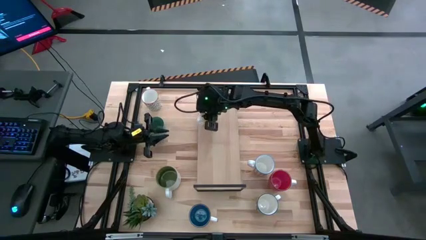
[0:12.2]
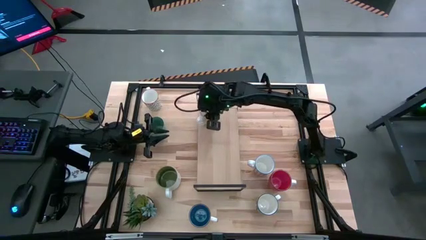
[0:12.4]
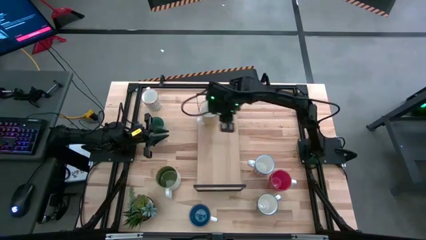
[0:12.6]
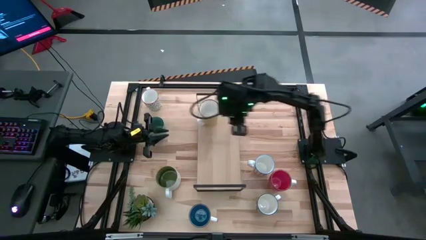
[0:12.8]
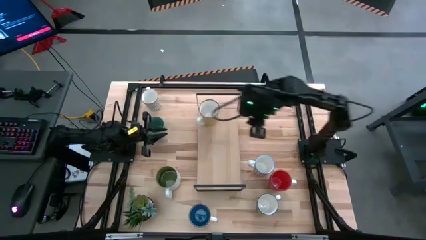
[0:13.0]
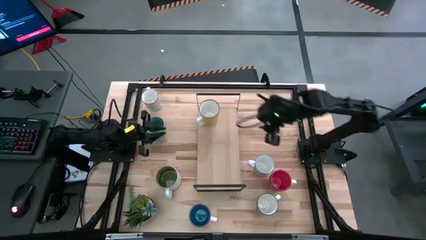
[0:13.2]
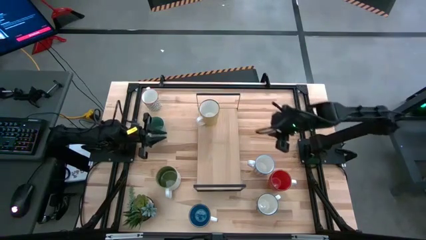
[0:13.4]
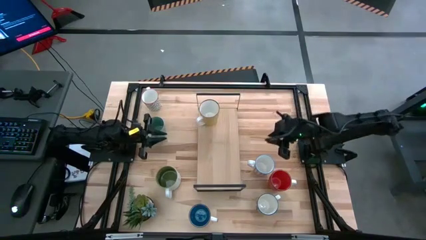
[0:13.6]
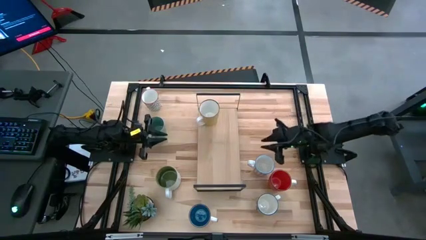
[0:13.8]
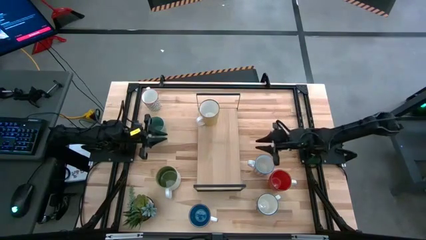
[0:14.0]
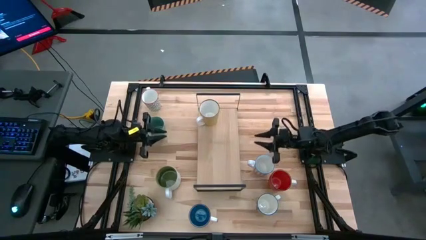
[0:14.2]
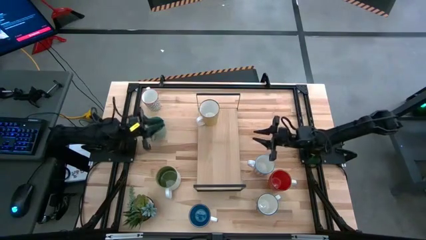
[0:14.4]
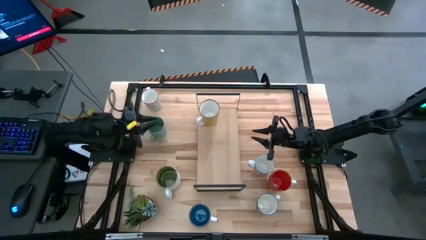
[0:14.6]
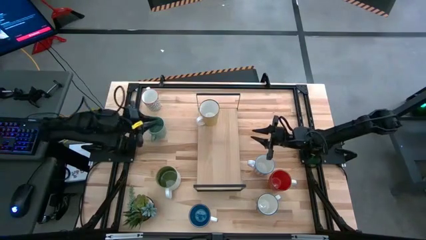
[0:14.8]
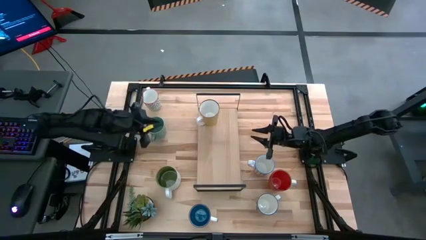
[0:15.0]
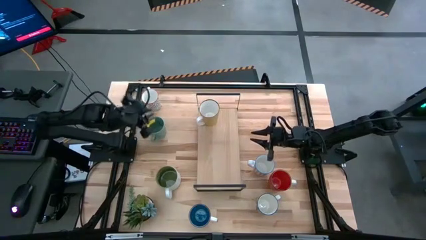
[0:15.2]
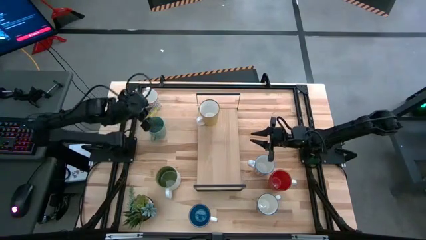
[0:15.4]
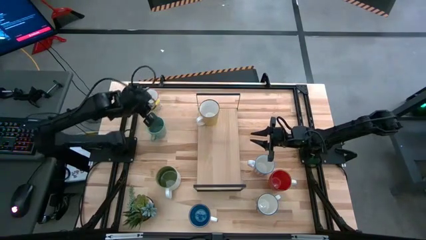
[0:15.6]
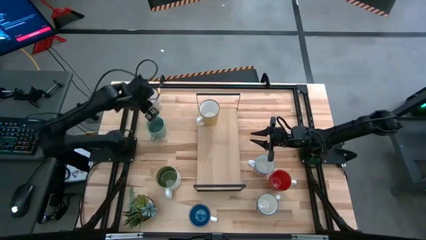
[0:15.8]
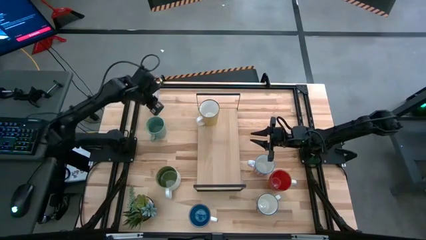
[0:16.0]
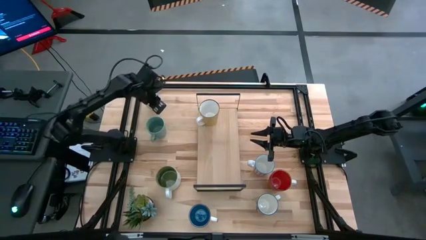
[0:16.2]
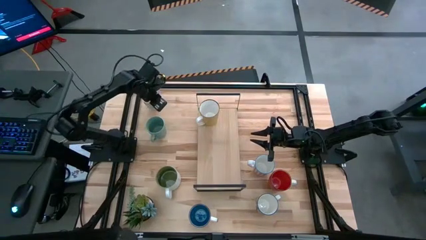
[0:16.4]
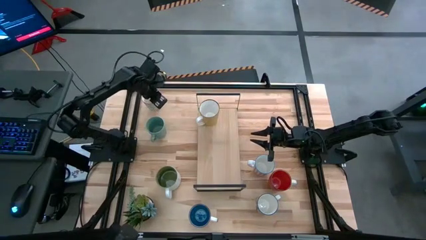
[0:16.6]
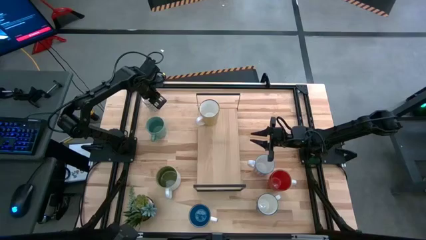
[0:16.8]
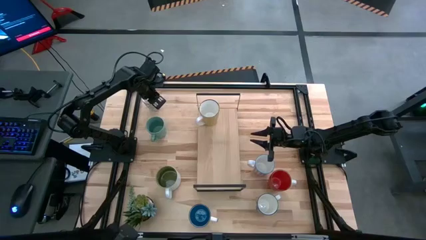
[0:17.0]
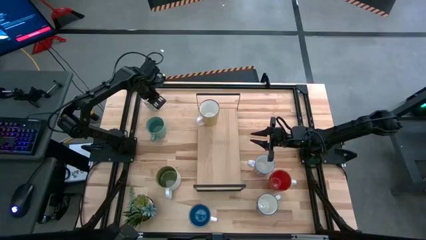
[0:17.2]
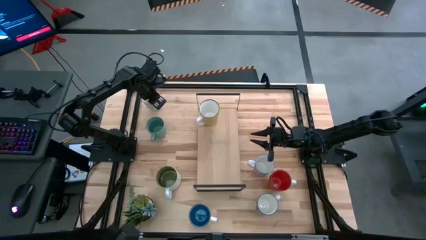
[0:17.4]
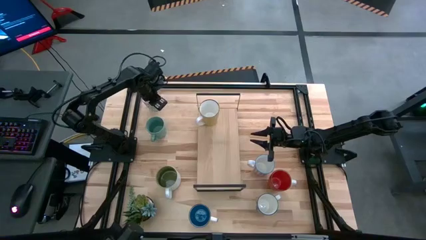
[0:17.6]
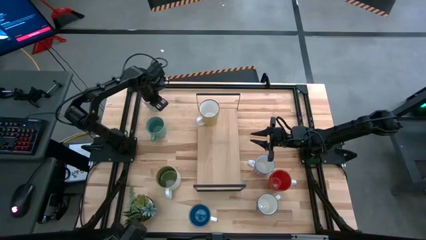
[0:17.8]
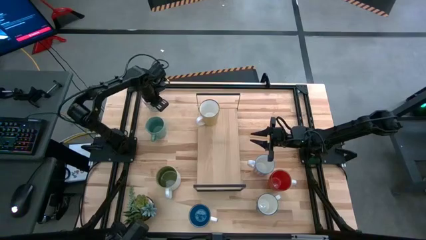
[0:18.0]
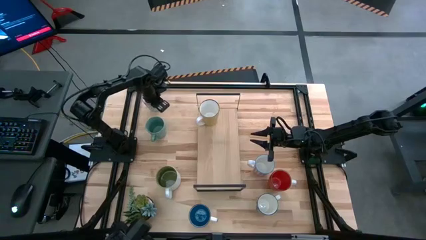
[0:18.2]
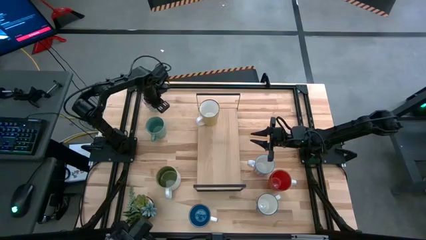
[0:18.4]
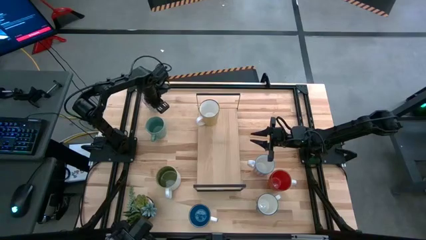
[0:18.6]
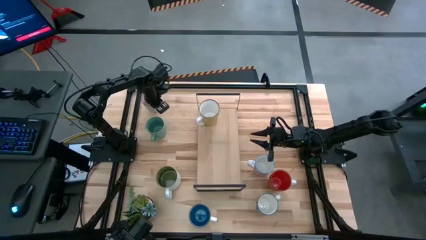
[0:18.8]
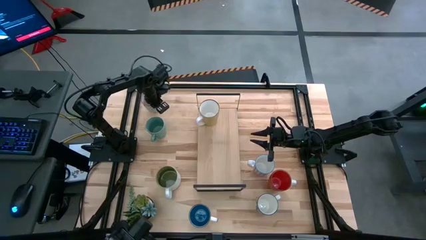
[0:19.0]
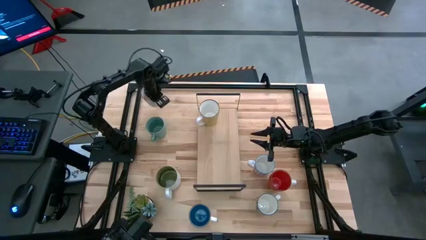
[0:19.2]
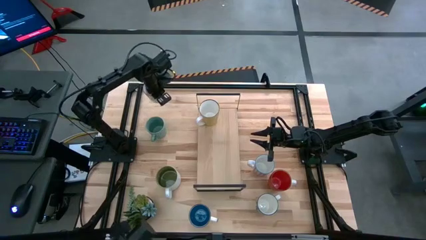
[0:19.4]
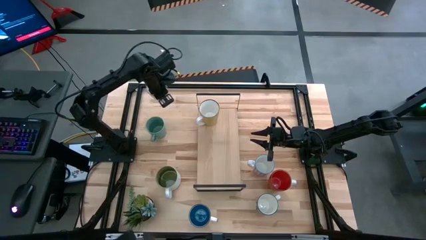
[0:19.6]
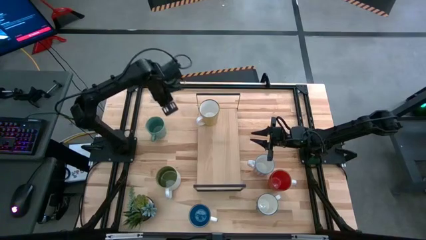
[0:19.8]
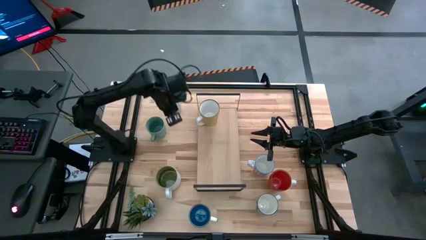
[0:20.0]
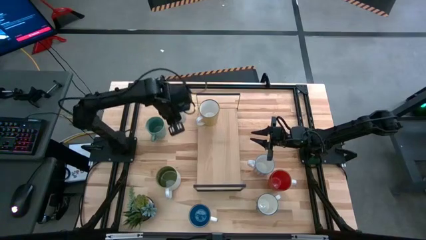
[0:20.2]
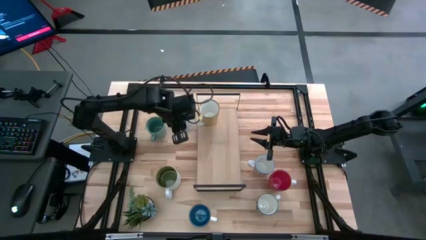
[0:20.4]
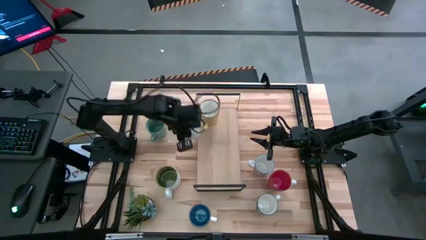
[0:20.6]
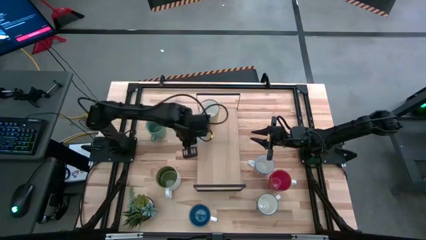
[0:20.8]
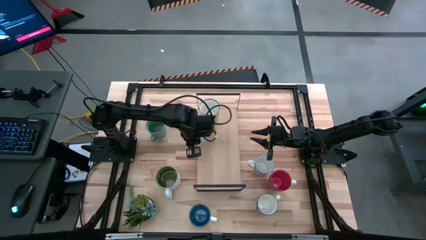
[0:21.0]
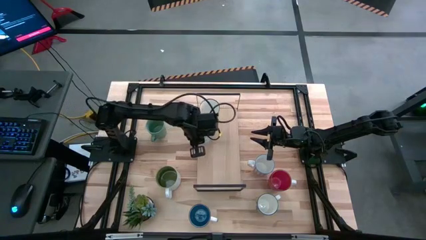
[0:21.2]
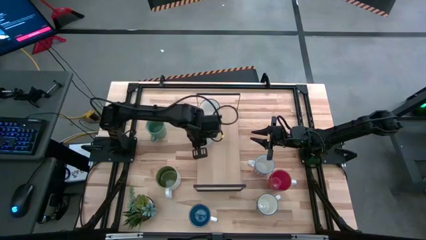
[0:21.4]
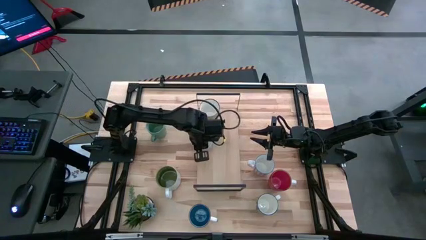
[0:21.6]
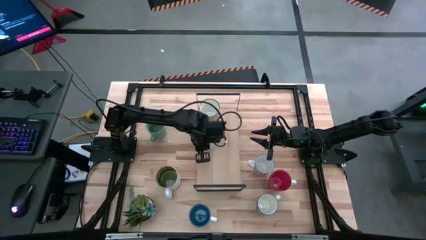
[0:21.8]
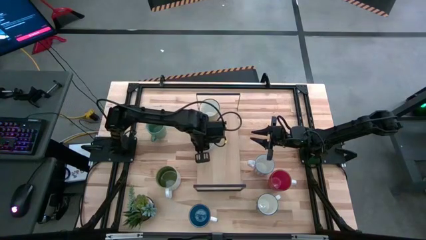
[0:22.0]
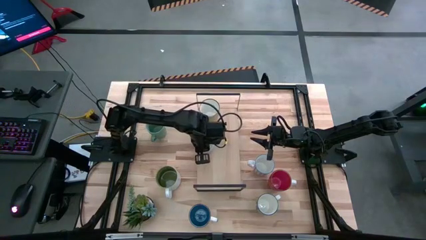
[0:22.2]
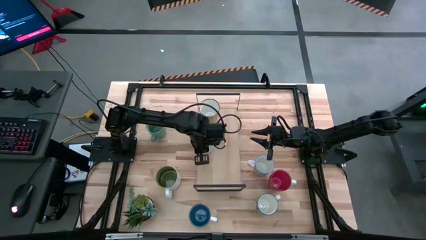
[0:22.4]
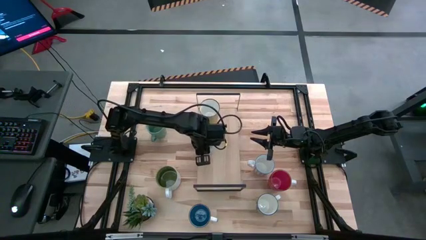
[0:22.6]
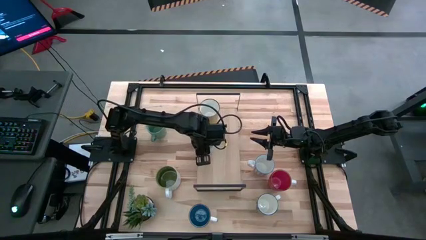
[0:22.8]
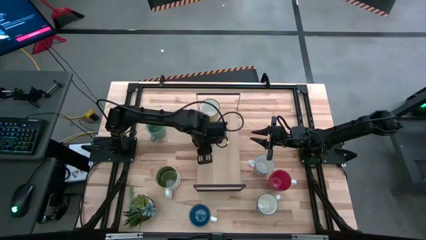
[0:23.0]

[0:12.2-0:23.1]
Task: Place coffee mugs
Put the white and gray patterned mug on the shelf

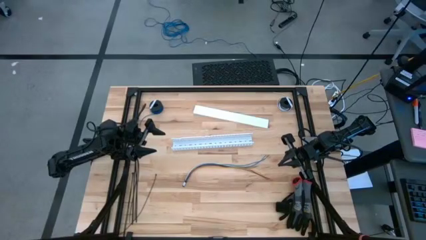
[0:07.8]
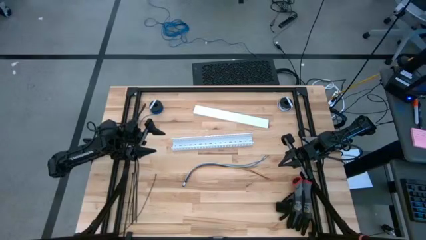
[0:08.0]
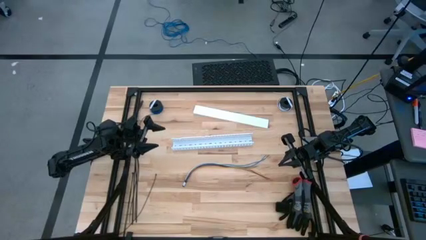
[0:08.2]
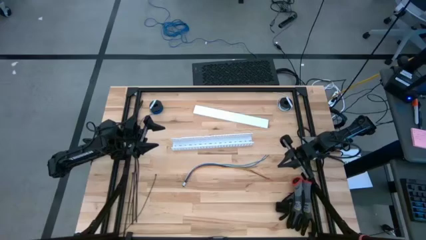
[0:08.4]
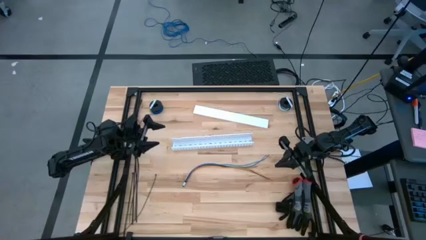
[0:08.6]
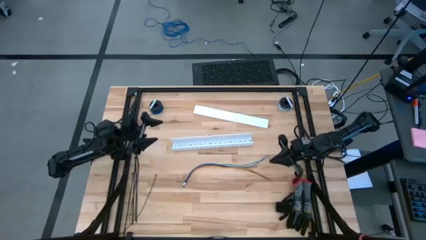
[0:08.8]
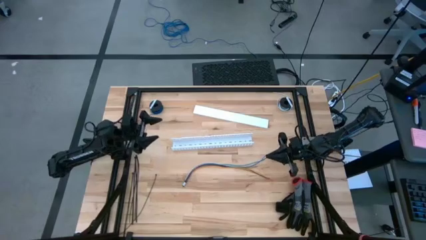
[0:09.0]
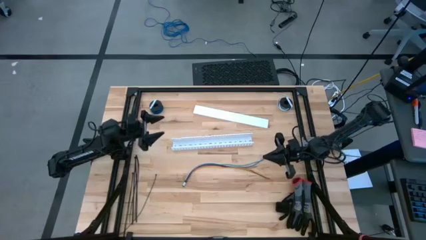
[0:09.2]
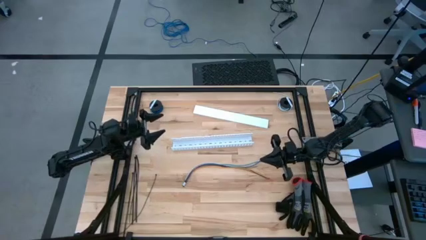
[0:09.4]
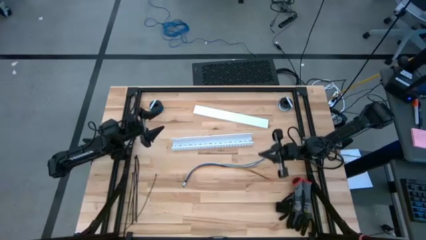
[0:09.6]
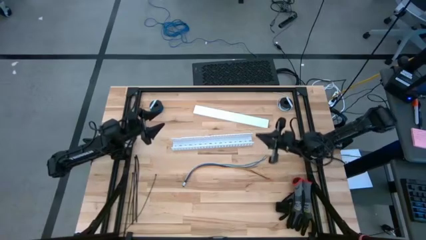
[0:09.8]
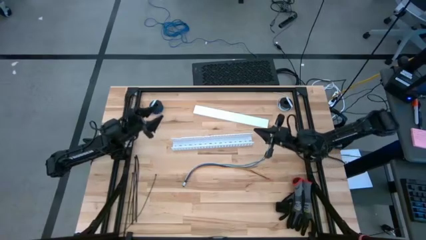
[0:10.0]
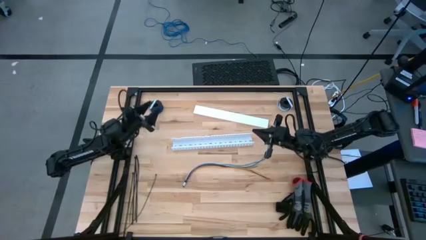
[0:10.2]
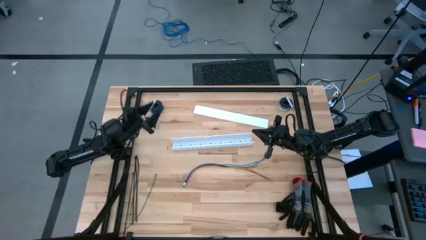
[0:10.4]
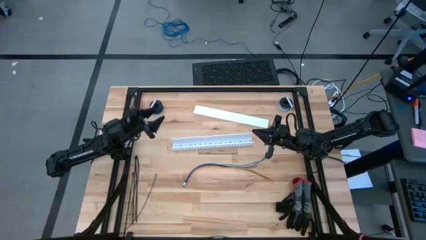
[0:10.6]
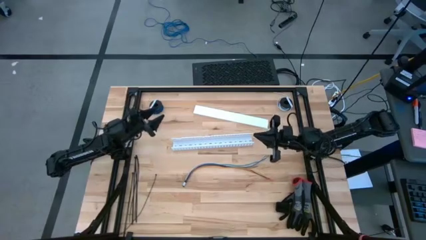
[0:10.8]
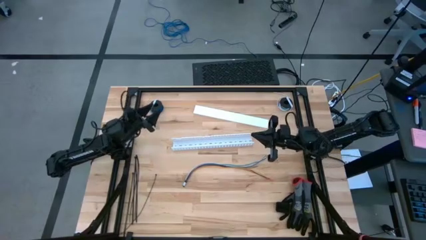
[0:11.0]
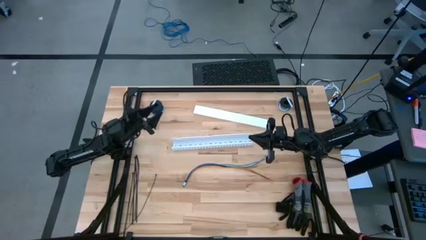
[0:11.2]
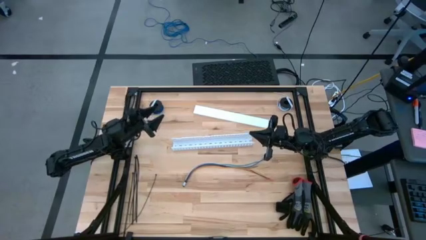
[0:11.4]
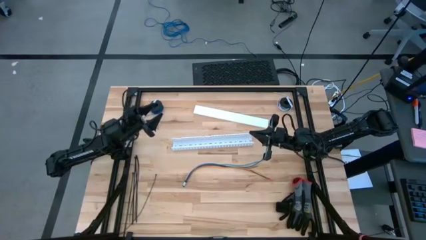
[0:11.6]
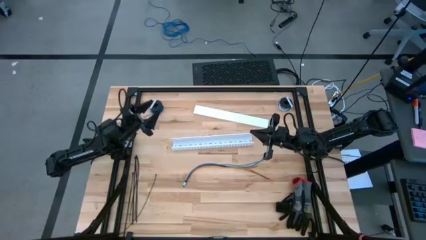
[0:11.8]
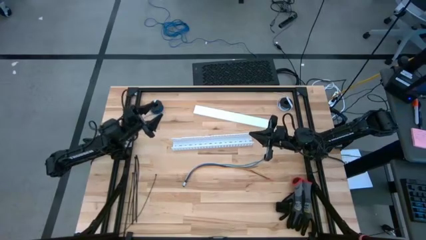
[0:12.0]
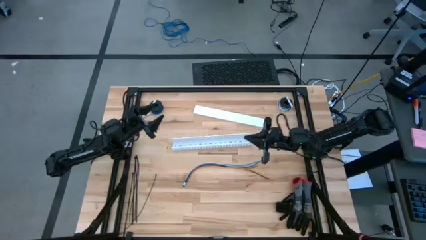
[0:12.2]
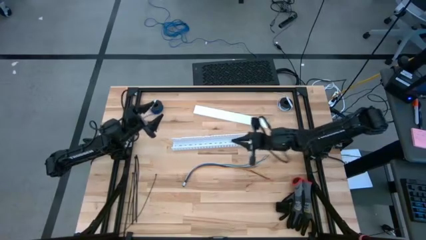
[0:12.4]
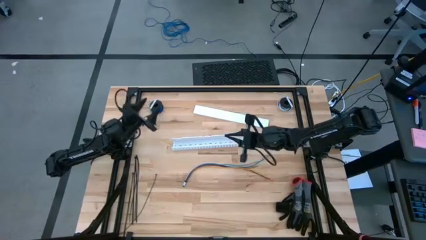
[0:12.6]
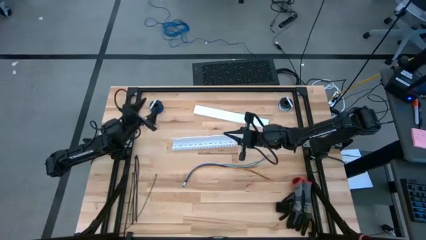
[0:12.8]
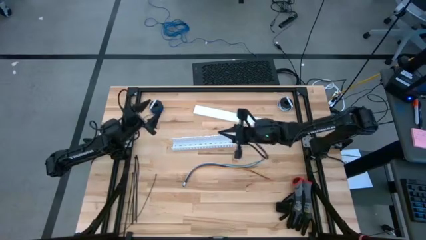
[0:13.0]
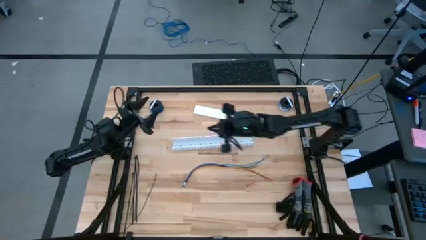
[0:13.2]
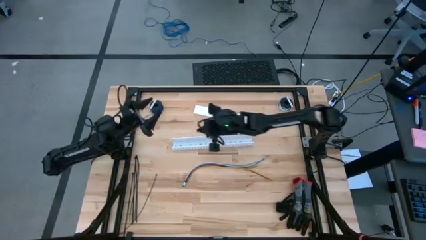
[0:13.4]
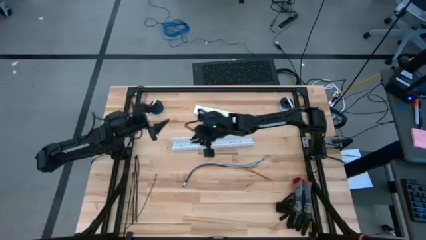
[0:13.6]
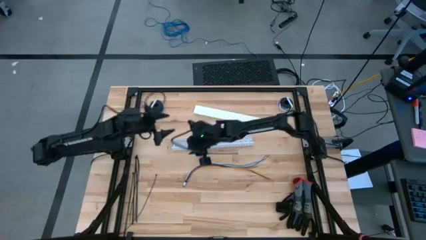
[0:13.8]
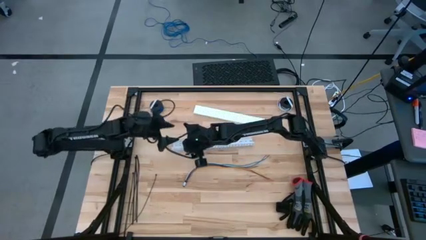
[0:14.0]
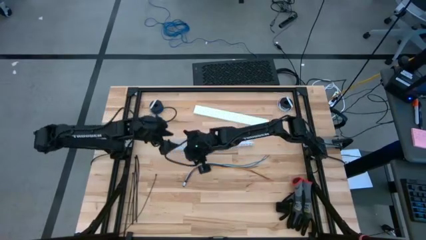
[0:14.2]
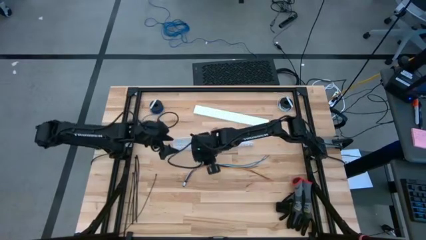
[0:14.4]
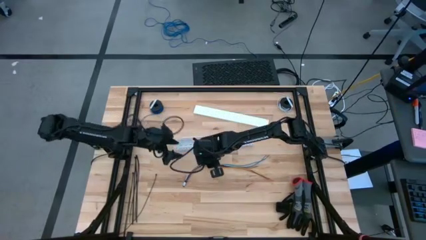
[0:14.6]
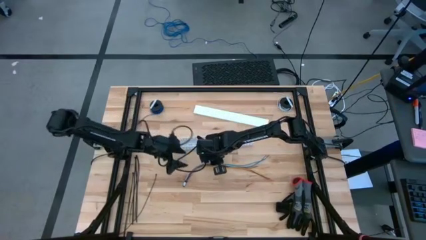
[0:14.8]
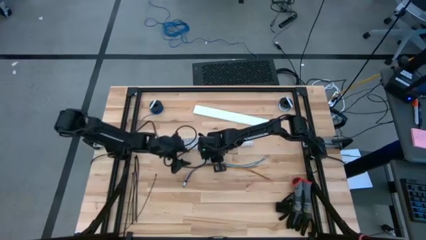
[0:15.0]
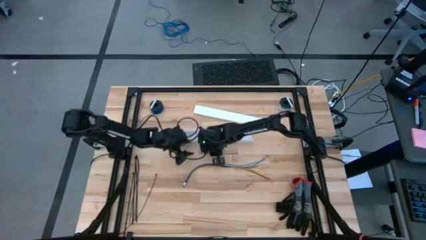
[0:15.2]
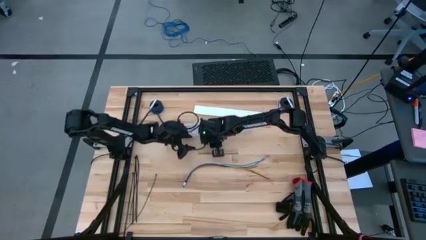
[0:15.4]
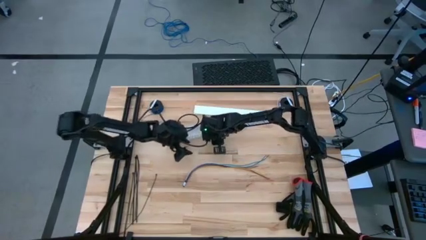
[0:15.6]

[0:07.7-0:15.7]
Task: Ziptie cables
Move the white cable duct to the top center of the table
